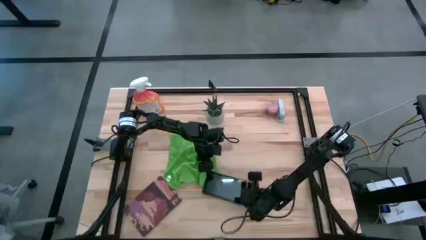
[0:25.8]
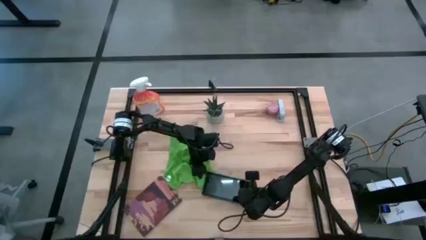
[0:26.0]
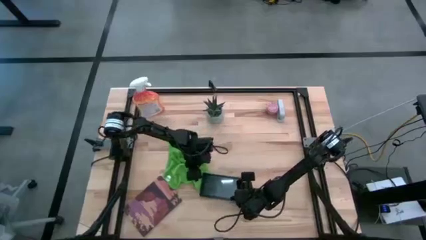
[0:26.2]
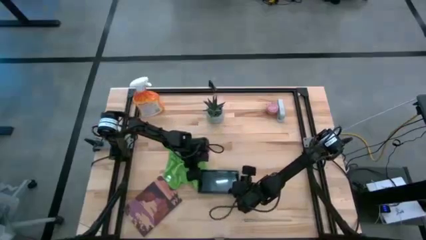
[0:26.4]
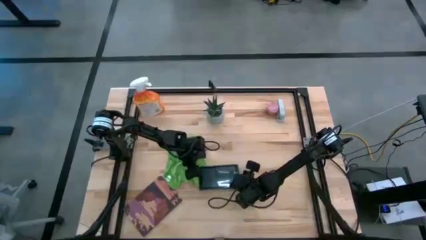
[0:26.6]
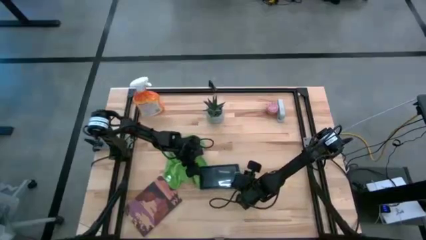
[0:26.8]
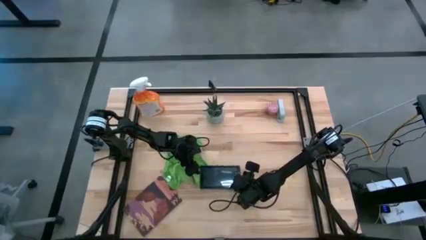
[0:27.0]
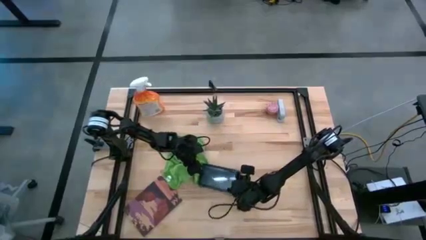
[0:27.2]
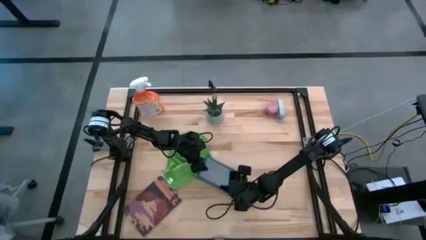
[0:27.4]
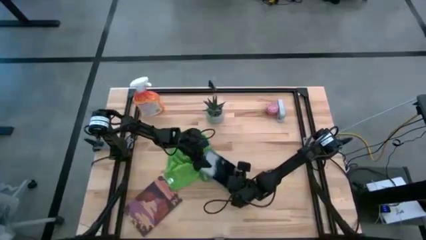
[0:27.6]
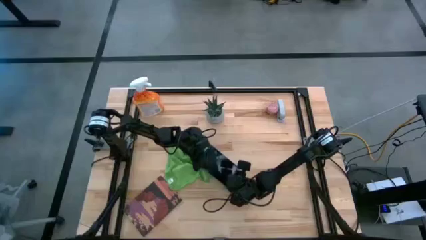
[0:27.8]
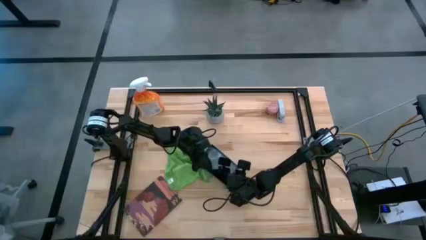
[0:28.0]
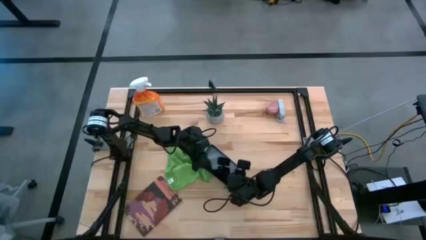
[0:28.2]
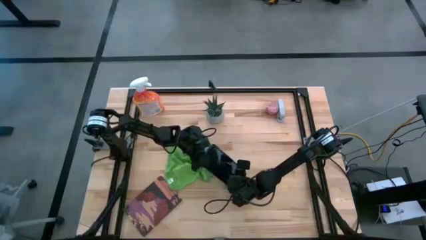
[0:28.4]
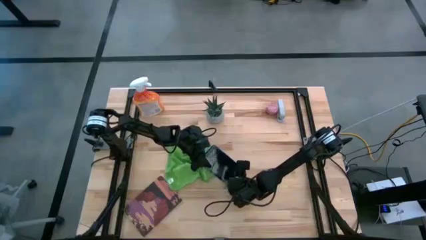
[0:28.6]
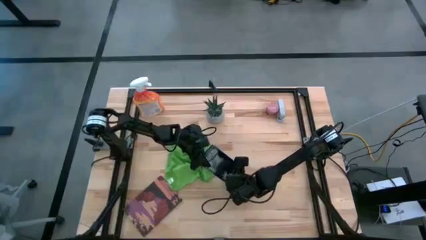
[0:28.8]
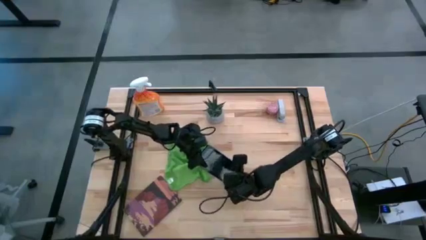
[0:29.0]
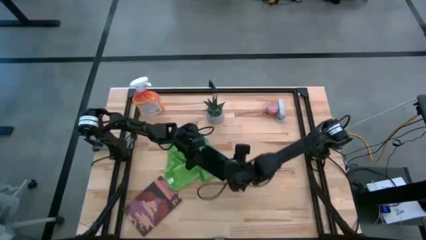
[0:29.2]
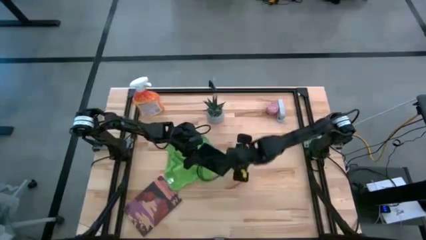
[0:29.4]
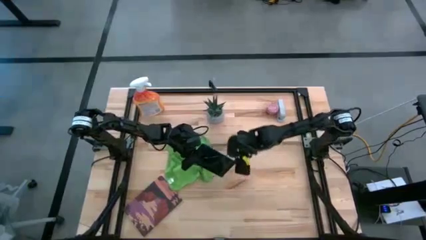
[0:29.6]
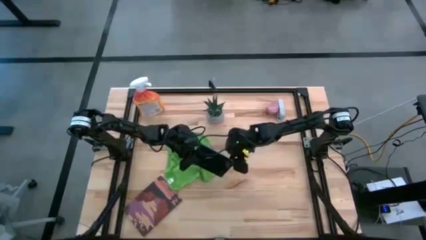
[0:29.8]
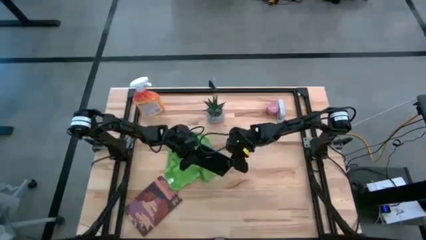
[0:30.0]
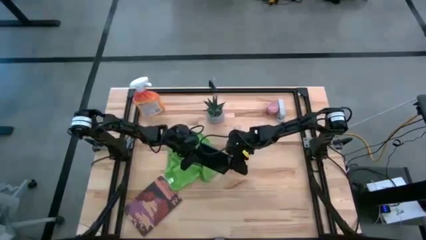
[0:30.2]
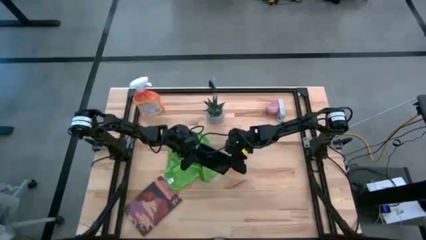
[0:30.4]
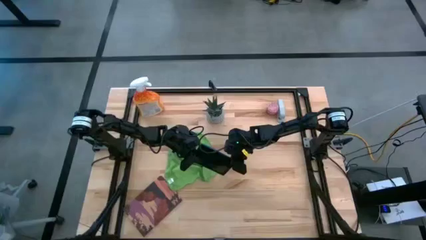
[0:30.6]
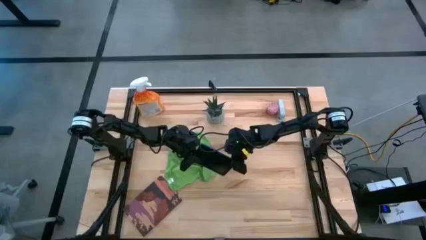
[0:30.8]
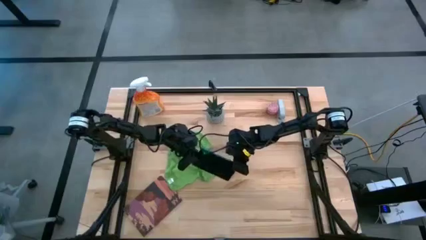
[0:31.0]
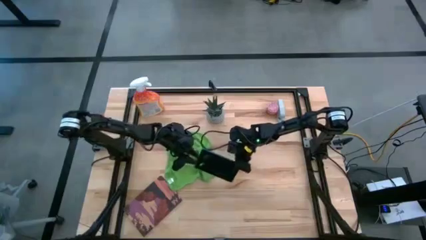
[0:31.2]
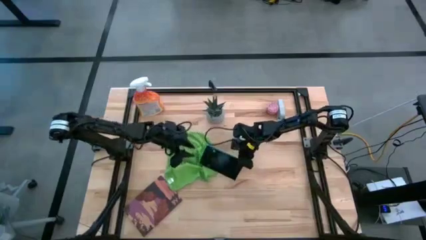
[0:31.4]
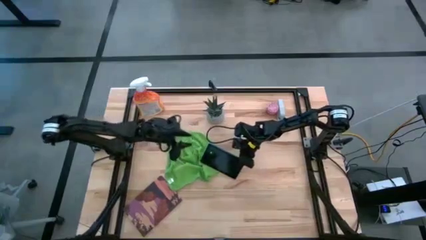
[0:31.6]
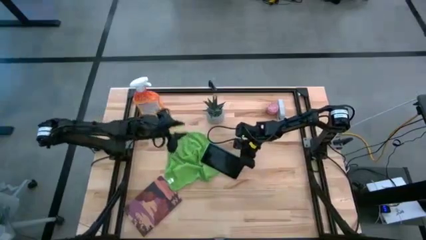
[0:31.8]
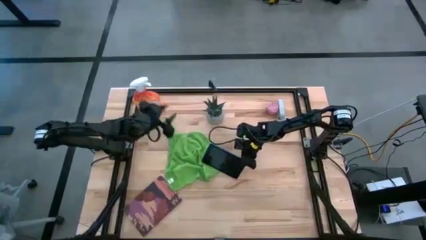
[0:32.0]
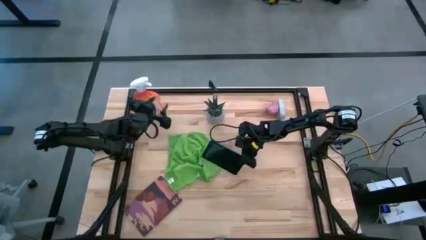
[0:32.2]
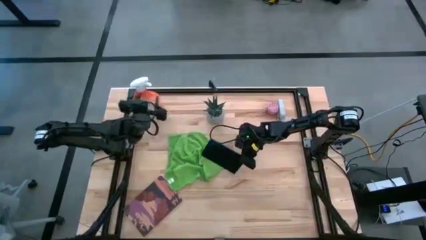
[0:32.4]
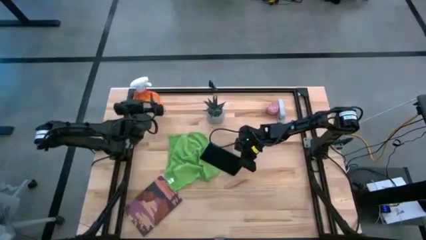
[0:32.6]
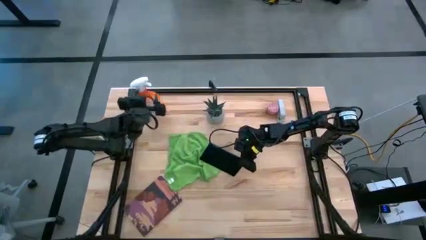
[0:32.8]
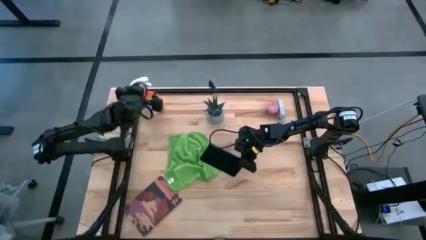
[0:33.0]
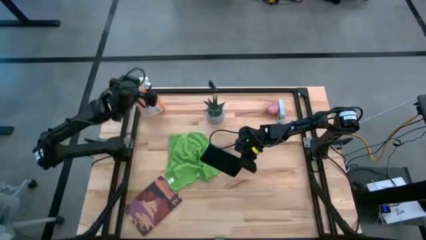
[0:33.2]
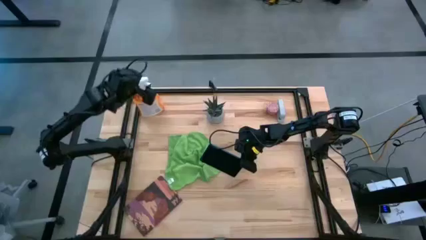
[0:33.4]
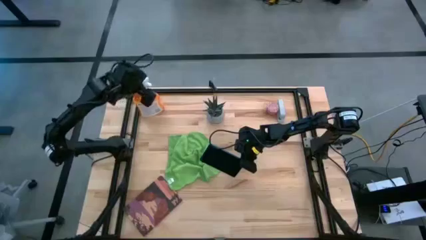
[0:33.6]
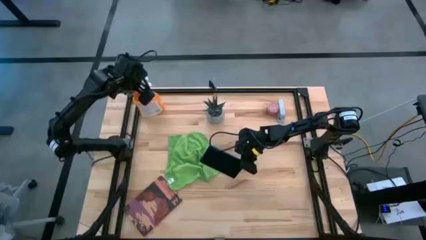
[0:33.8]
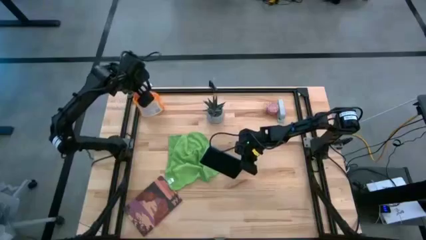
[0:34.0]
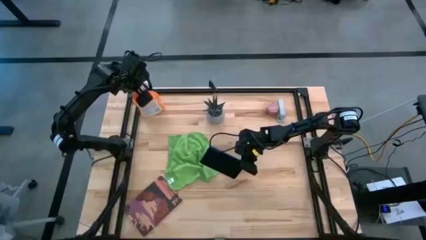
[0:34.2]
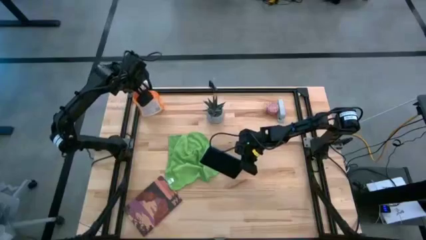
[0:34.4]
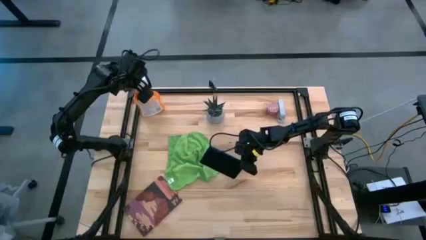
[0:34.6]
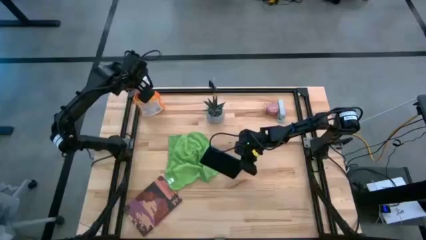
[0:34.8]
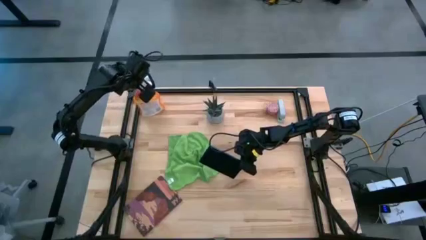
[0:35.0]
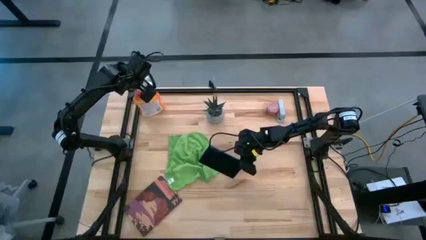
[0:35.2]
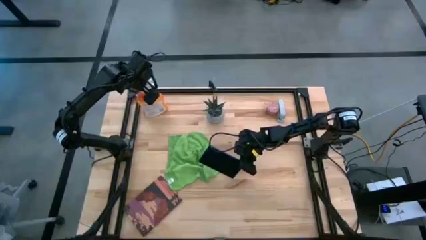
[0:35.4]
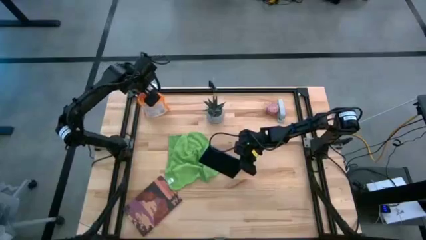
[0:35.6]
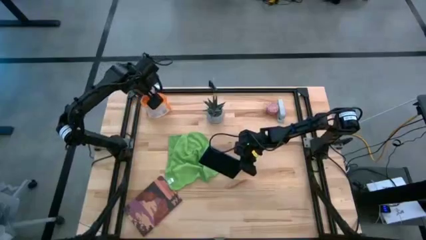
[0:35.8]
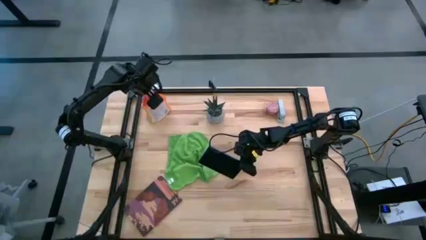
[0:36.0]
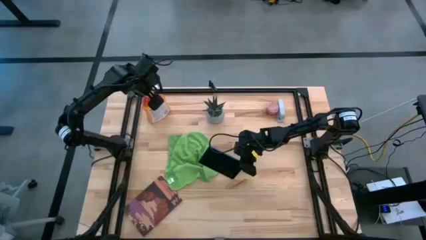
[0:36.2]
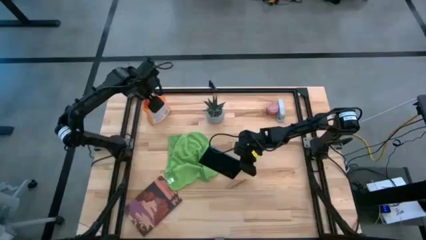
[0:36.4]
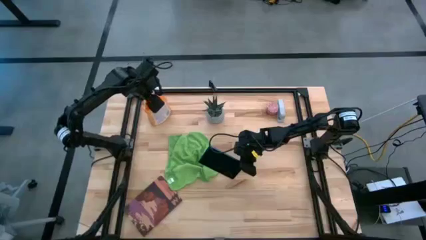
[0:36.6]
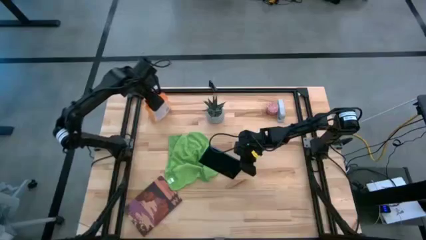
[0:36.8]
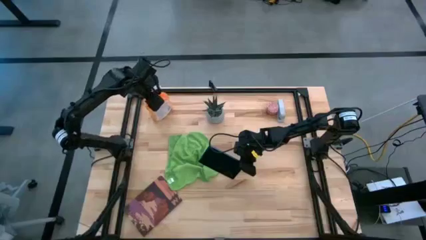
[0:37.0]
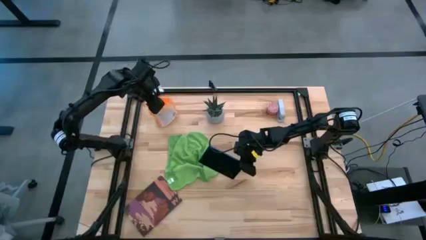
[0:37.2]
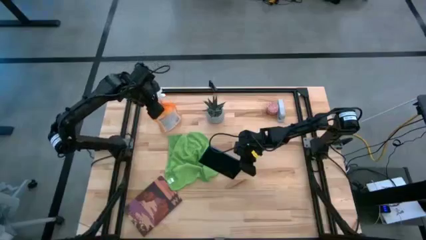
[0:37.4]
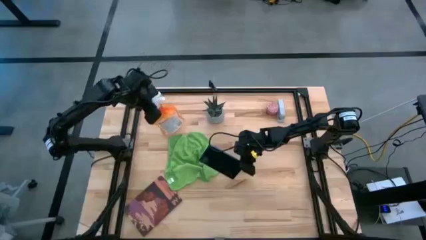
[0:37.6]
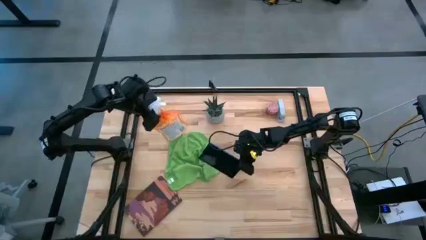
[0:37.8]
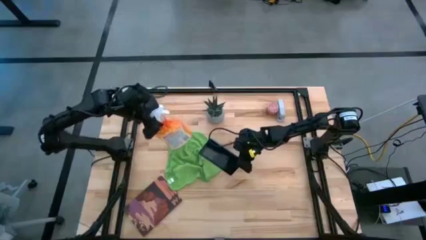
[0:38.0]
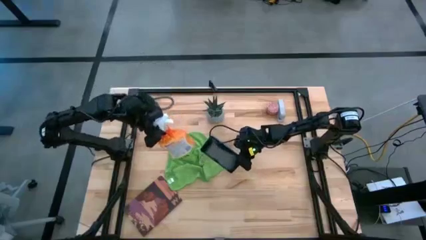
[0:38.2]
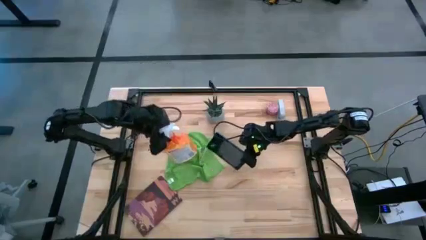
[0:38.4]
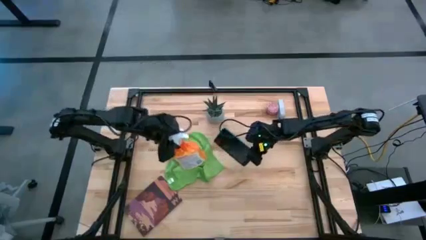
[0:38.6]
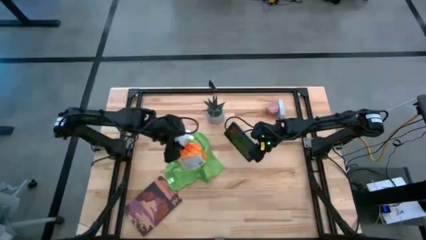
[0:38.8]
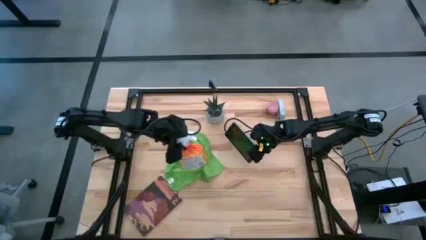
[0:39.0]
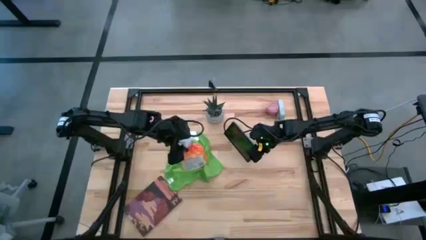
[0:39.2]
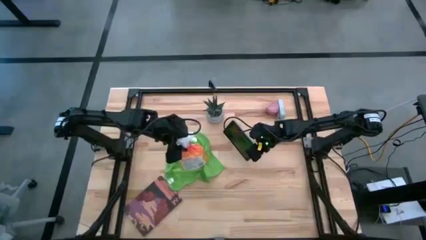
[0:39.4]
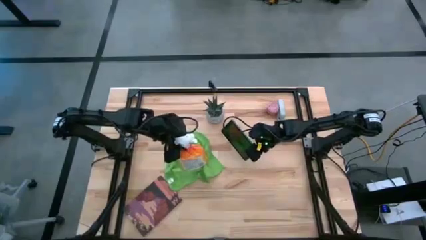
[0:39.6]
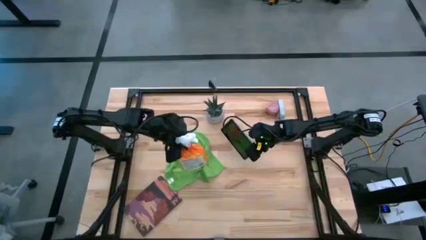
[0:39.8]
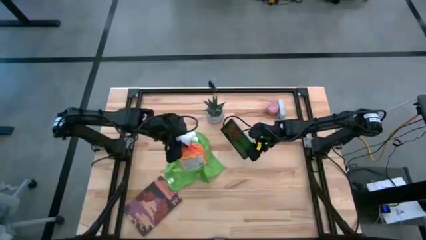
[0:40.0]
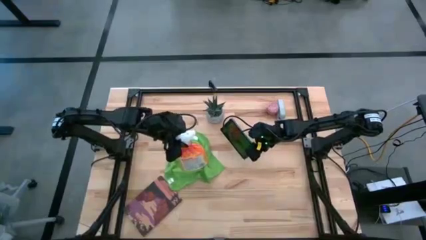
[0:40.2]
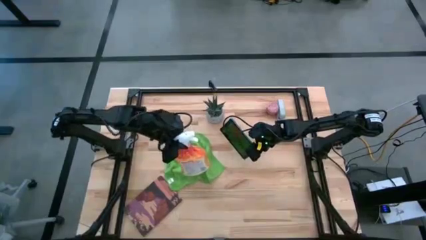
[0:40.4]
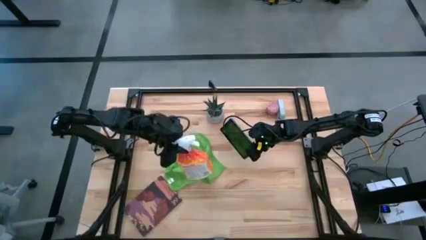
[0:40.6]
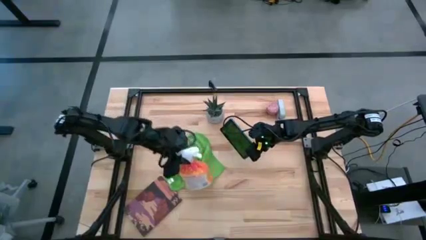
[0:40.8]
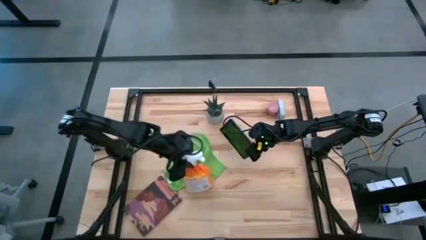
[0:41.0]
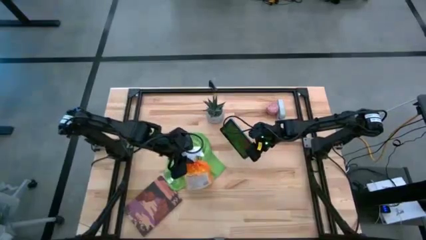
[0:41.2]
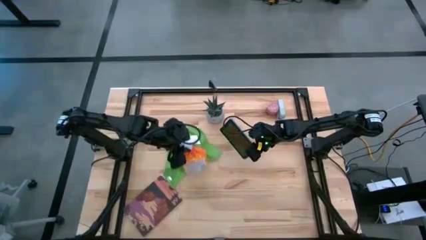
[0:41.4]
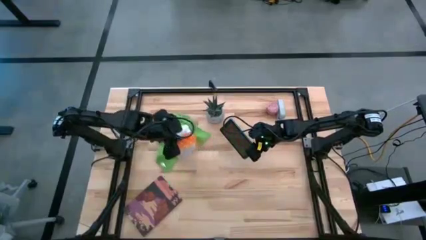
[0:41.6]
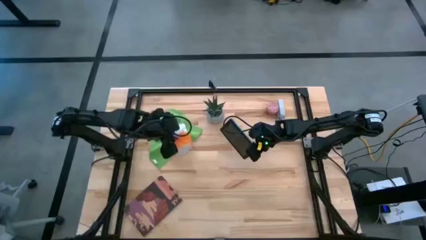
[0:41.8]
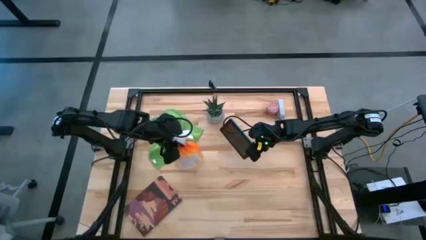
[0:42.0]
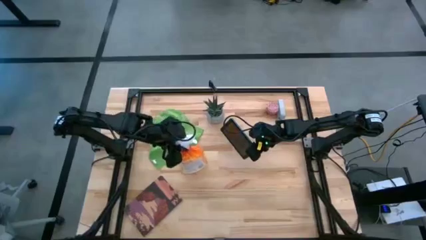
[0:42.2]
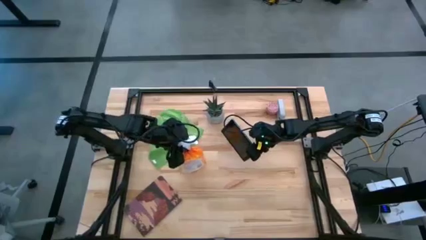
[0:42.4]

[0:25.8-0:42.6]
Task: Apply microfiber cloth
Spray the front and back of the tablet with the spray bottle

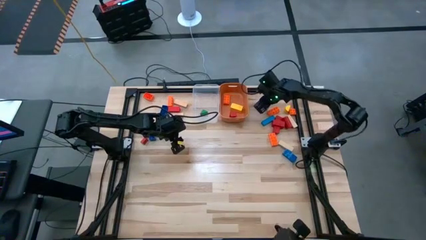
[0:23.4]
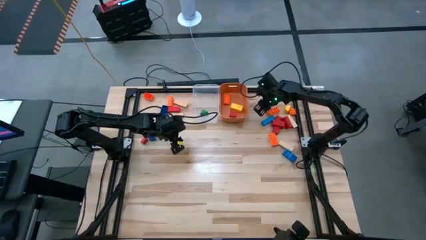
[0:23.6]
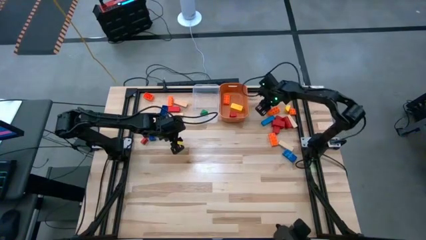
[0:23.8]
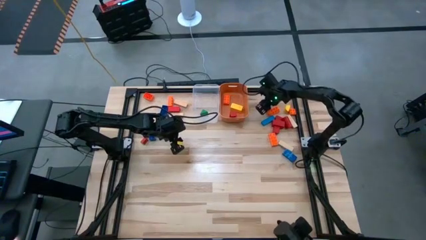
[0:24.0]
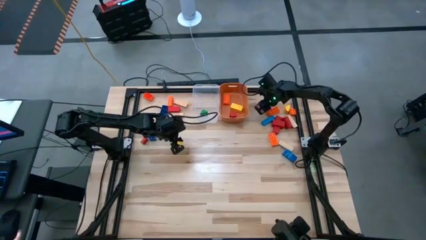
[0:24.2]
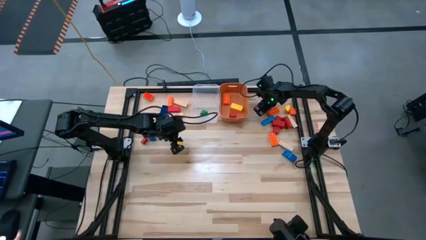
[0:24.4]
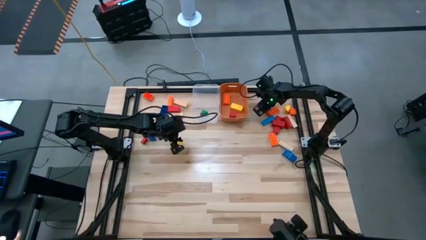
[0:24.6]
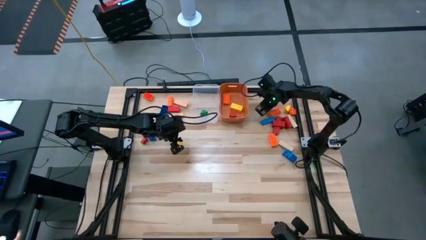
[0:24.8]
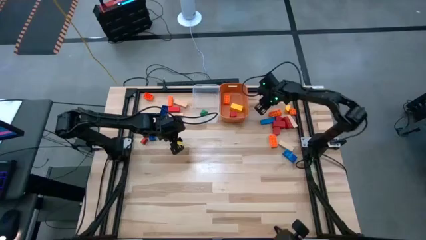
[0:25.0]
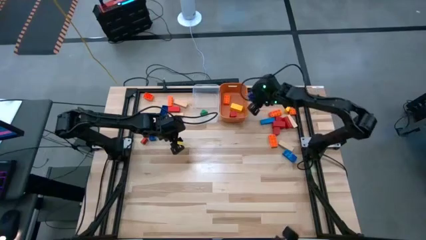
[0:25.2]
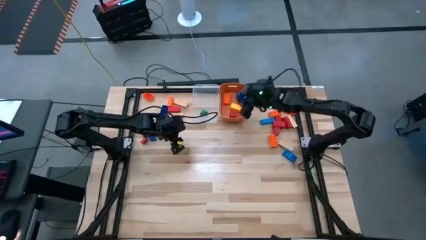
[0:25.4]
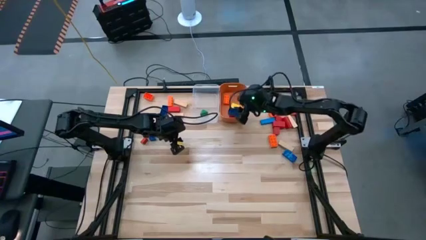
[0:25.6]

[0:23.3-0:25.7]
Task: Sort blocks by size
Put the blue rectangle block into the orange bin
